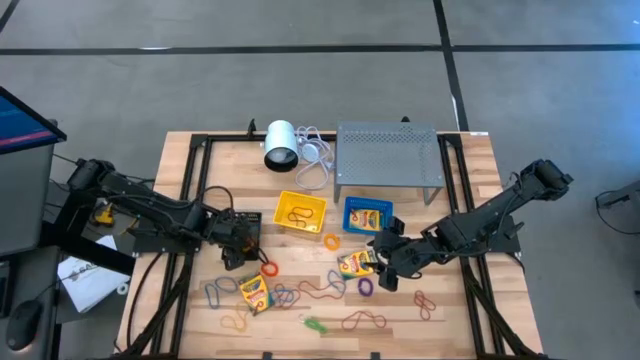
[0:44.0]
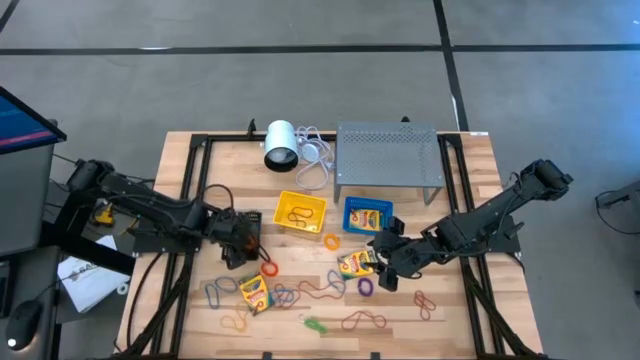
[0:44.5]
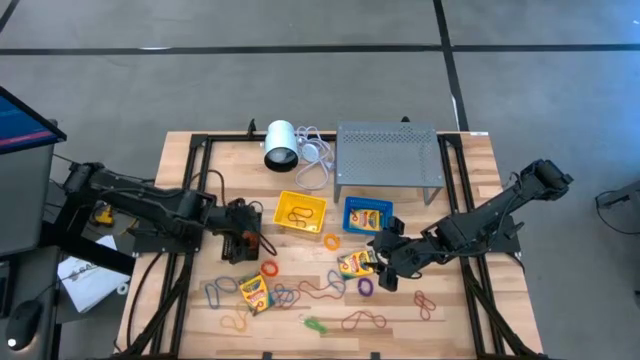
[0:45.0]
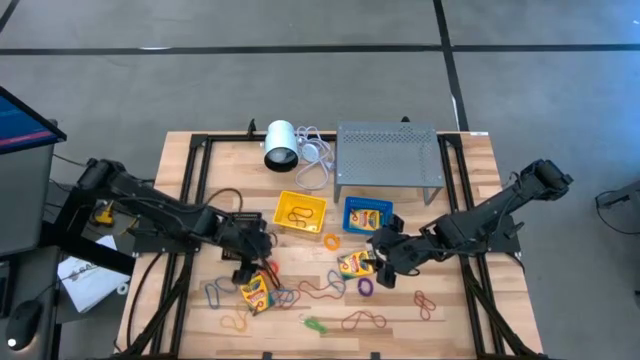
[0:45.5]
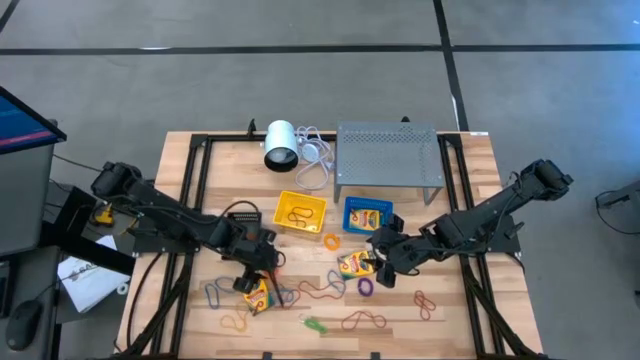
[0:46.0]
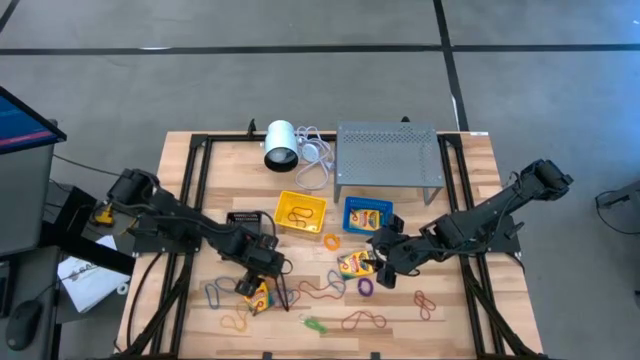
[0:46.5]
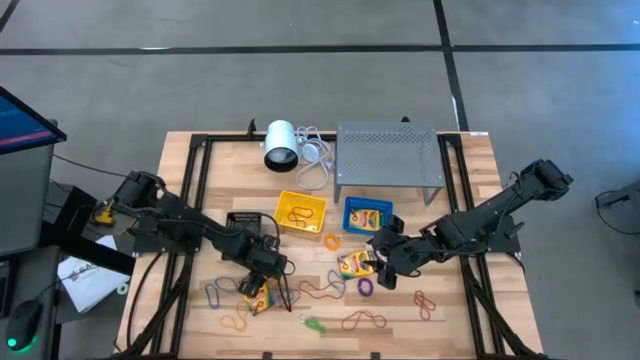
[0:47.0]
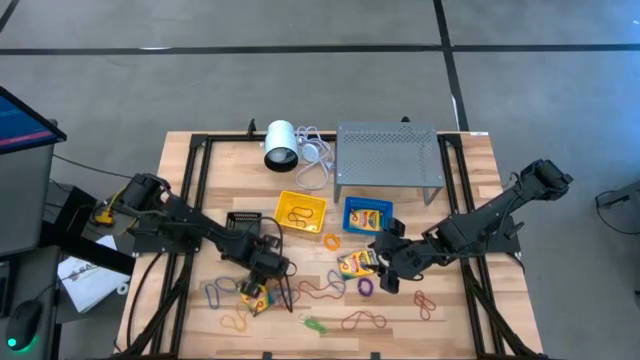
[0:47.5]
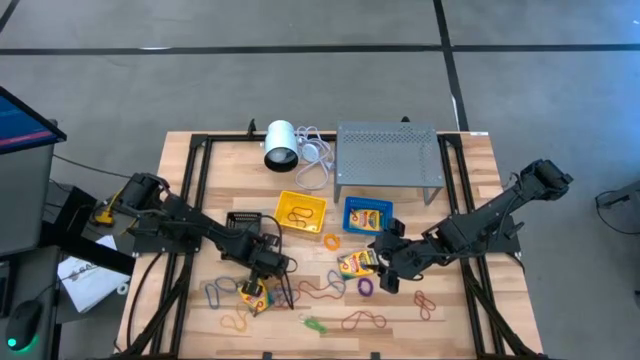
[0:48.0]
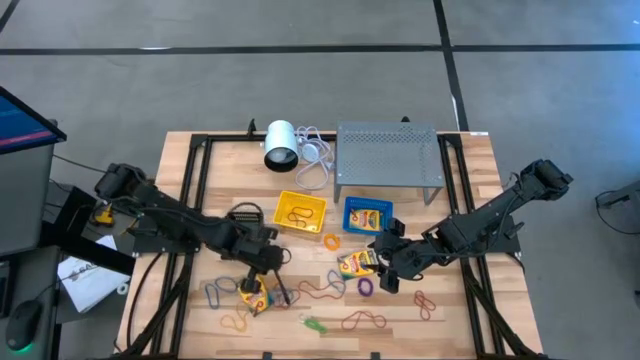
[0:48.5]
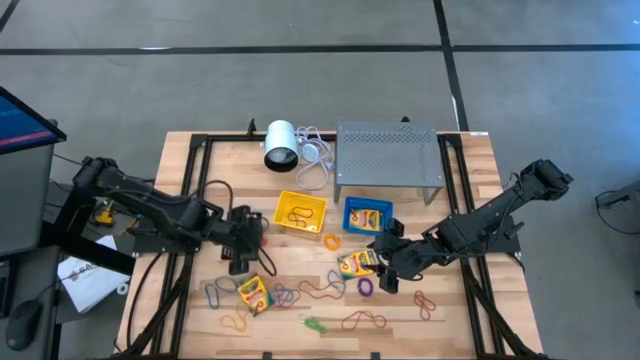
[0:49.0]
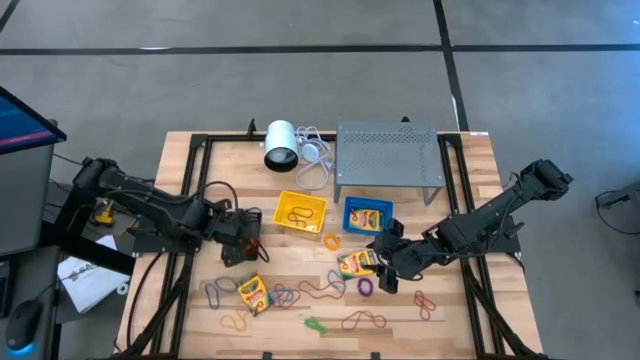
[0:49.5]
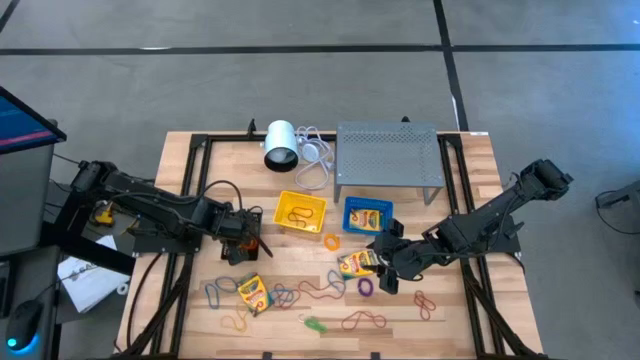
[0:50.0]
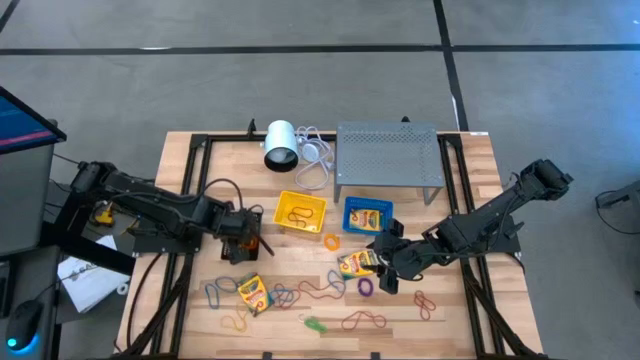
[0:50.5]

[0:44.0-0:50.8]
Task: Pick & Place Office Desk Supplies
Put the orange spring keychain into the black bin

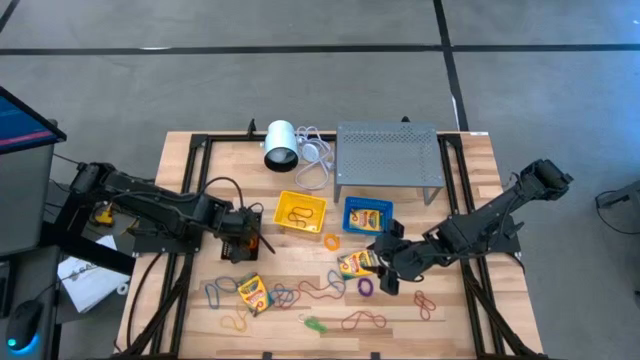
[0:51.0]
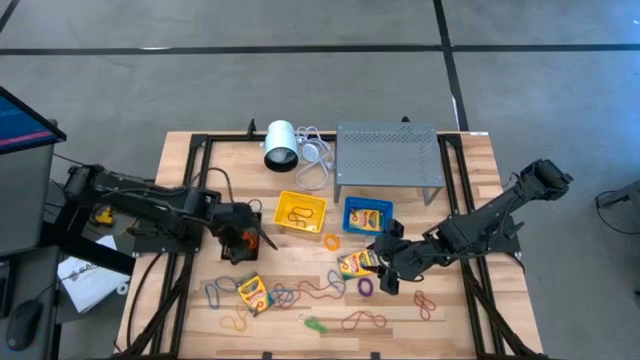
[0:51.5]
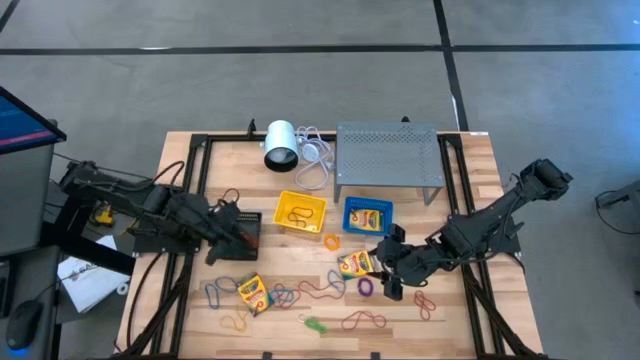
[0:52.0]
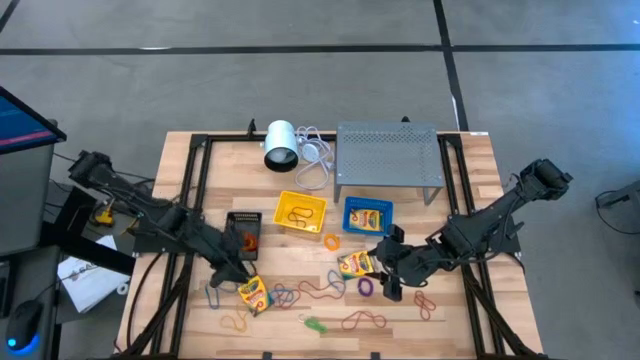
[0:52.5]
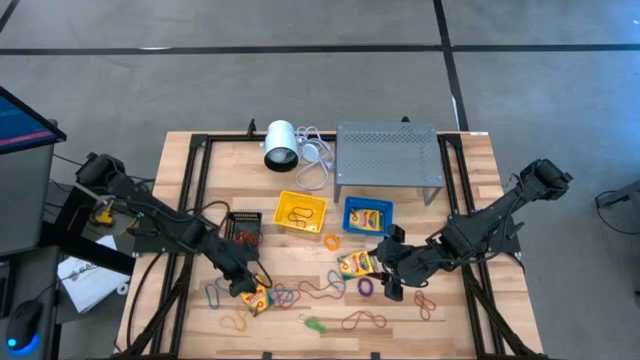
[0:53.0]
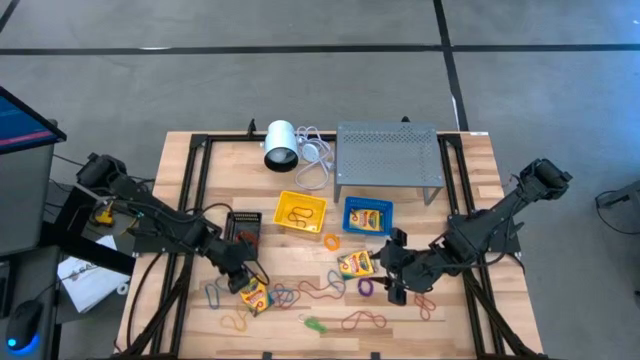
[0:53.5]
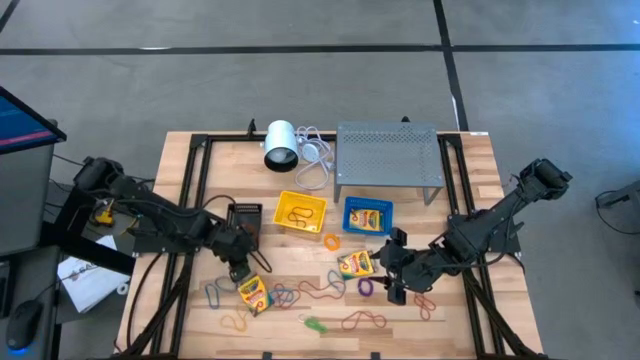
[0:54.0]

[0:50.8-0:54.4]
Adjust the black bin

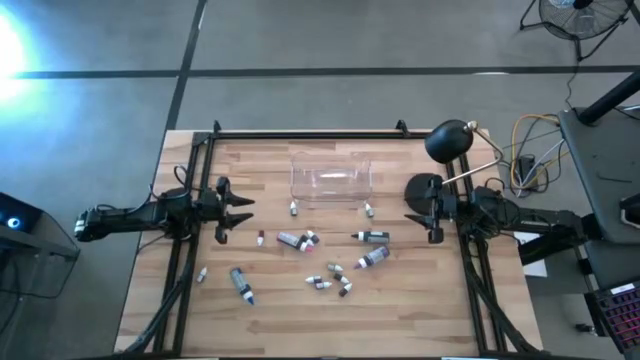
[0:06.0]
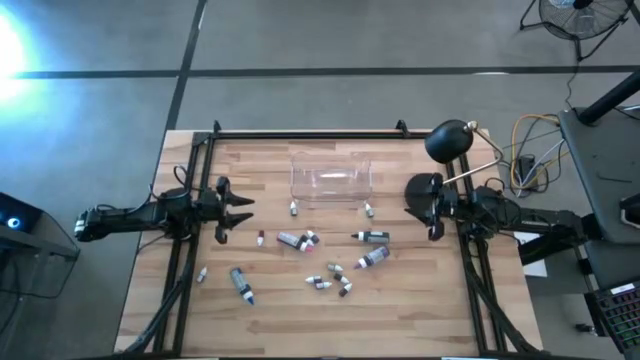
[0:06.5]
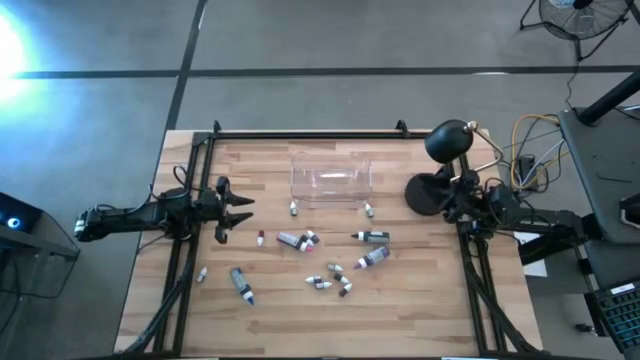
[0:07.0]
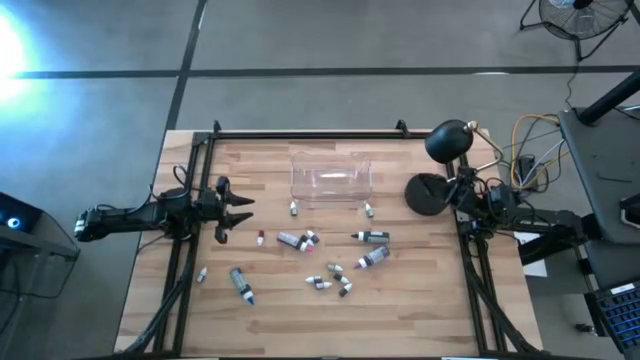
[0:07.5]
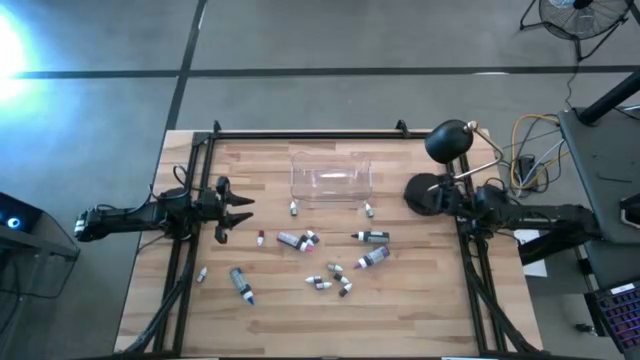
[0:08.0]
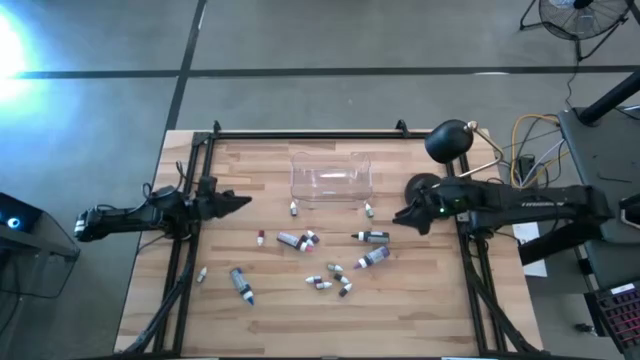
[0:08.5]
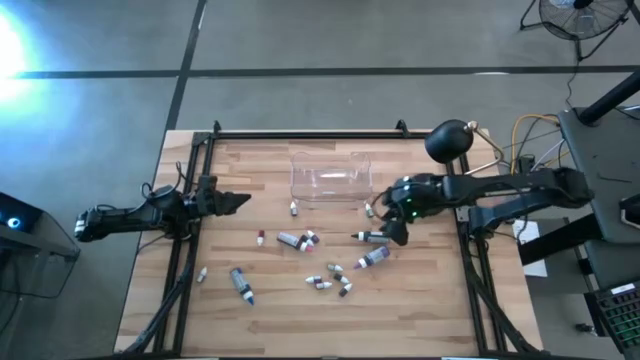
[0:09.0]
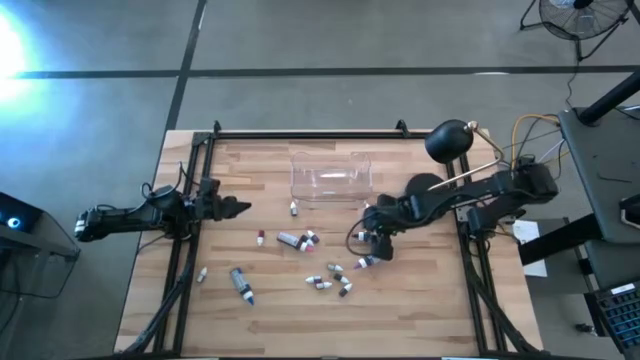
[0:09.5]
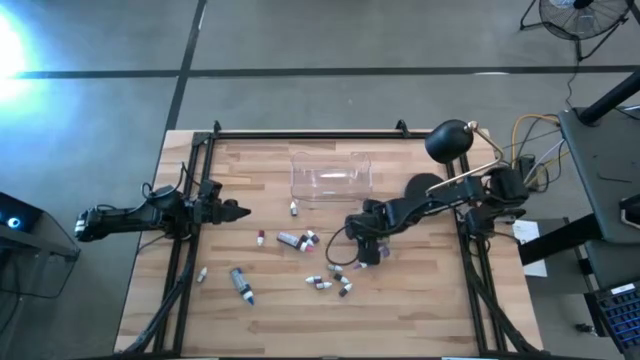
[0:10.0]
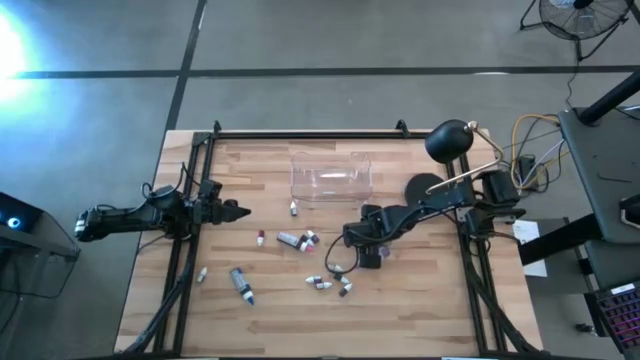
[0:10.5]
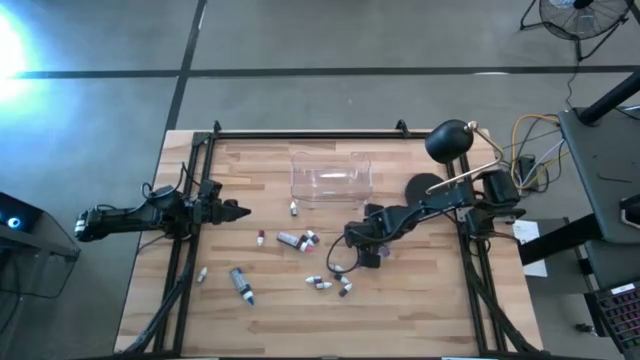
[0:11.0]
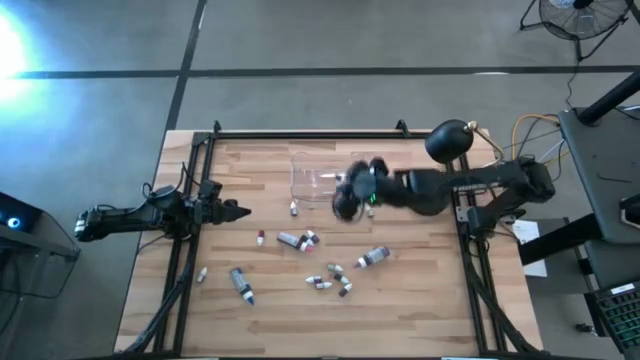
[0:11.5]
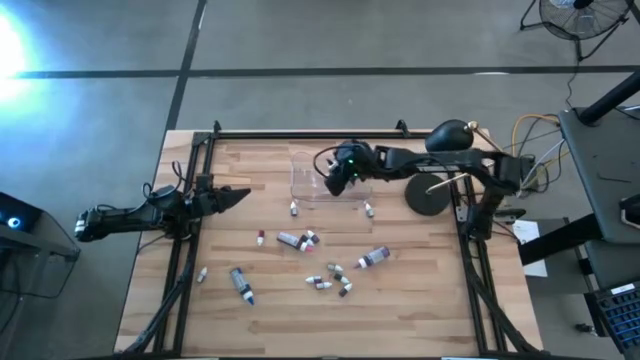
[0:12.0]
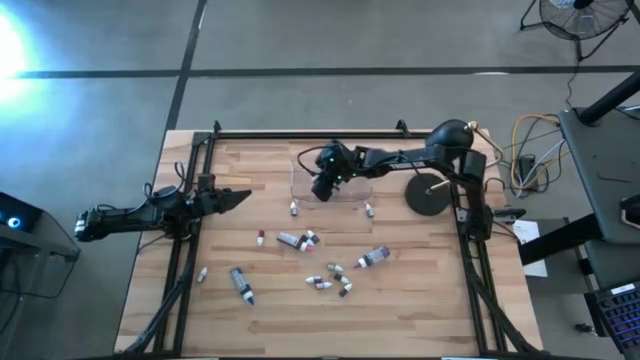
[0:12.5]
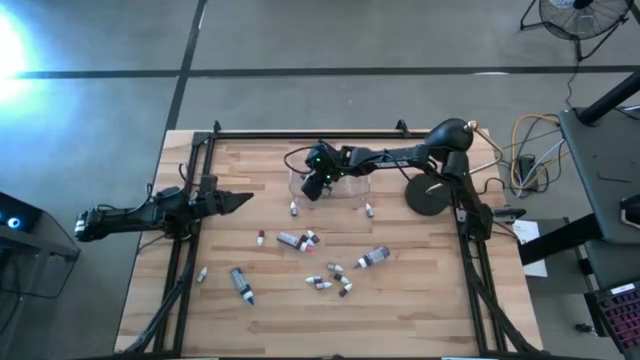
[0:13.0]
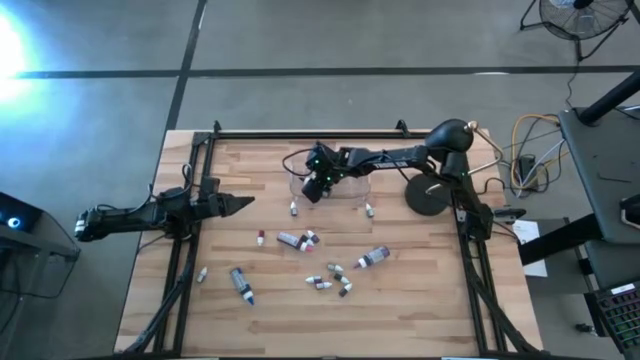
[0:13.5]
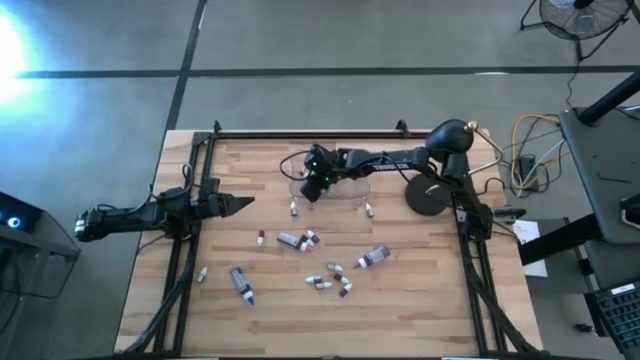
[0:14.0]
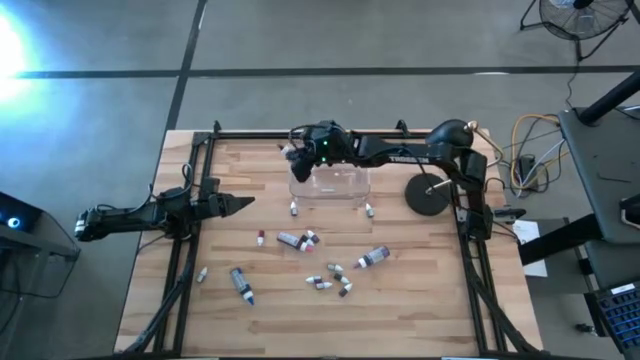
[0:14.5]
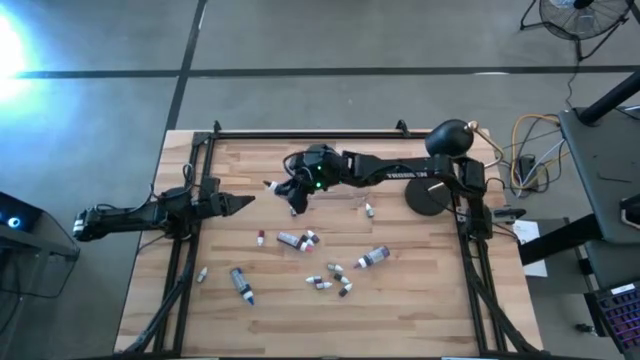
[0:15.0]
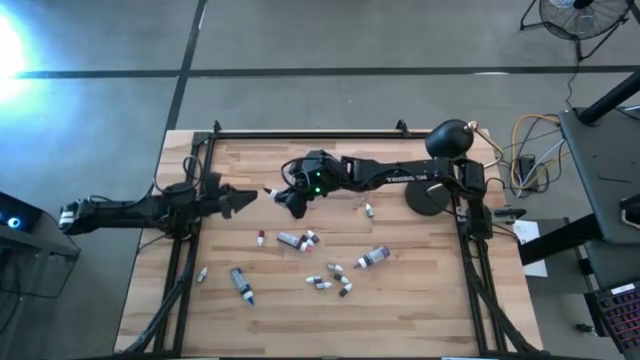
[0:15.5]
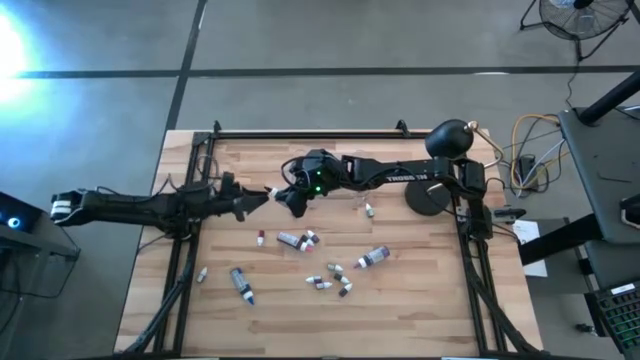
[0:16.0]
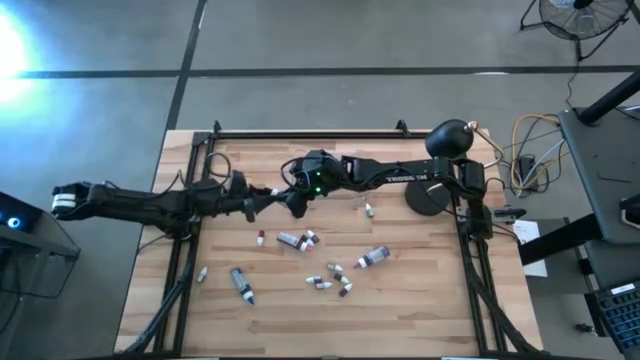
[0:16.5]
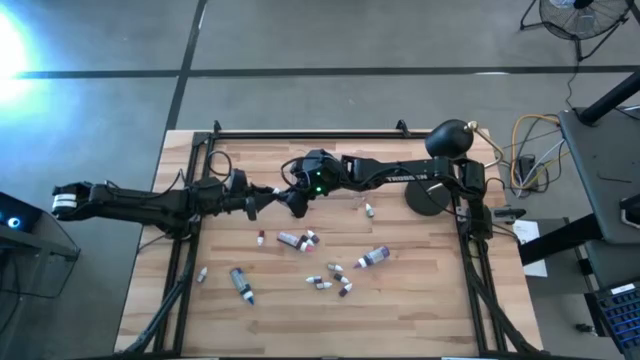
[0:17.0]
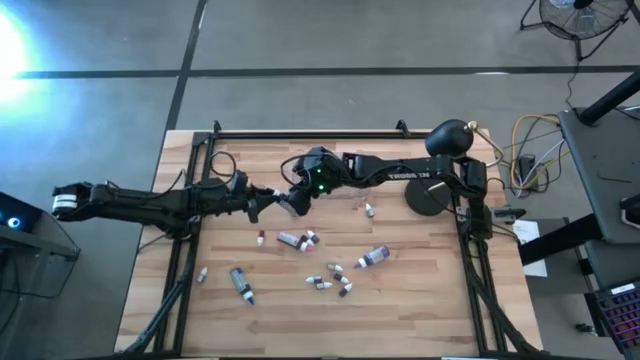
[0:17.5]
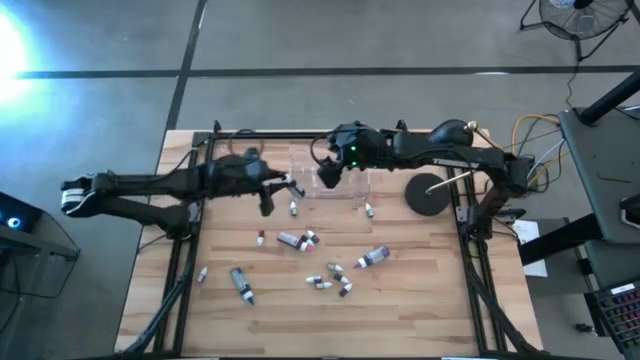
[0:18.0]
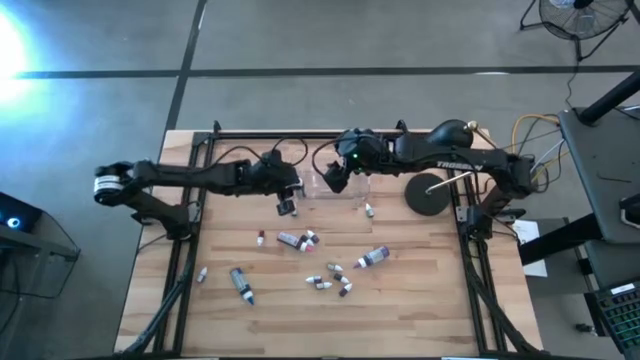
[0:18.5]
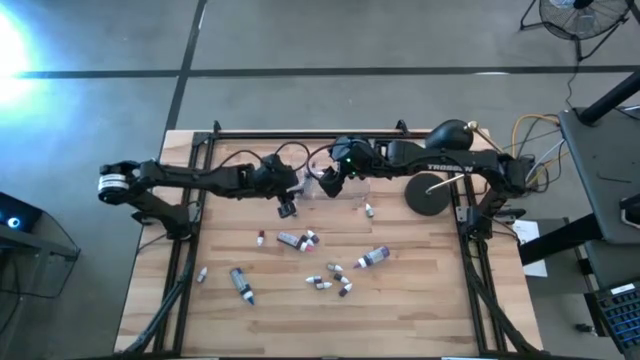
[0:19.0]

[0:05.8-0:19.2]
Task: Pick & Place food coloring
Put the large black food coloring bottle into the transparent bin
